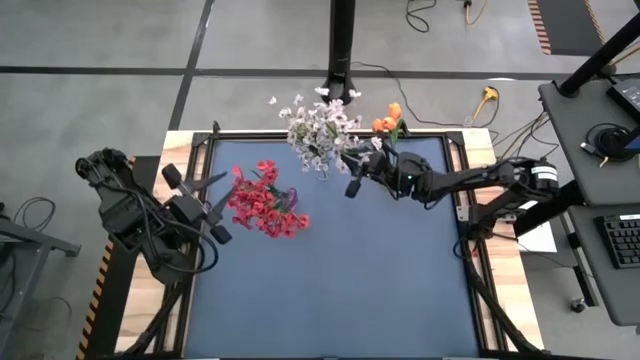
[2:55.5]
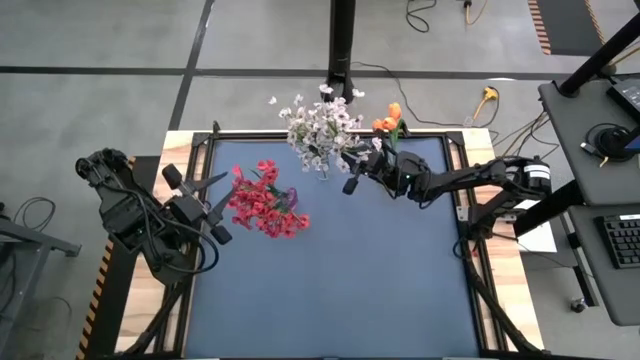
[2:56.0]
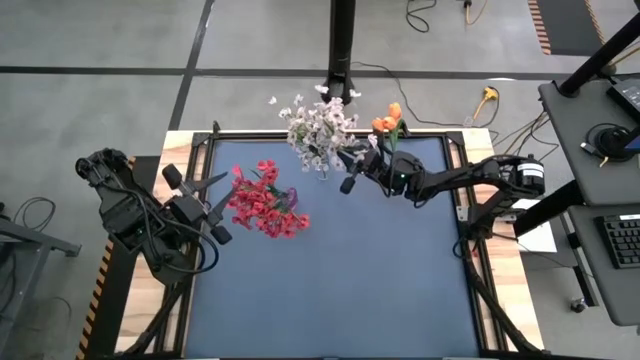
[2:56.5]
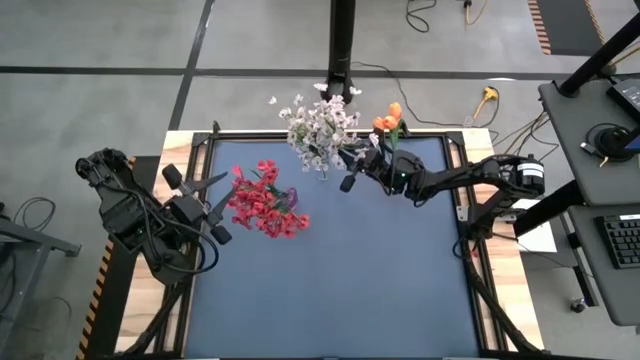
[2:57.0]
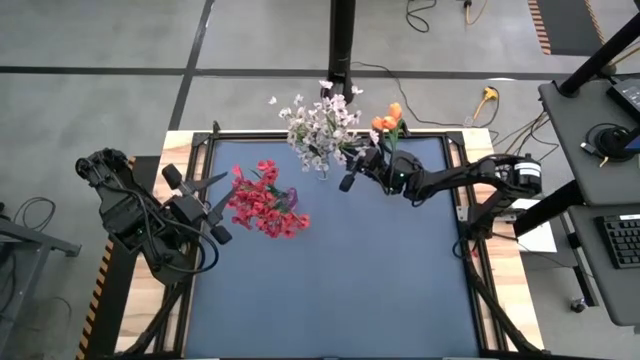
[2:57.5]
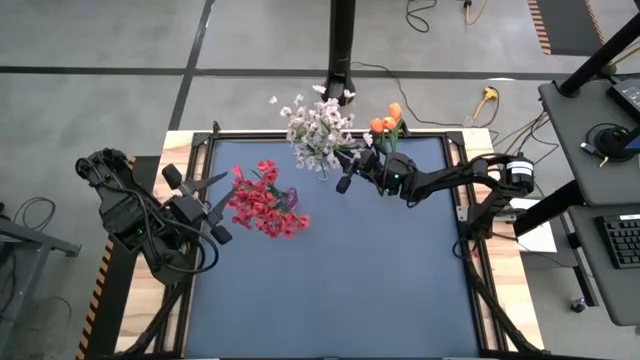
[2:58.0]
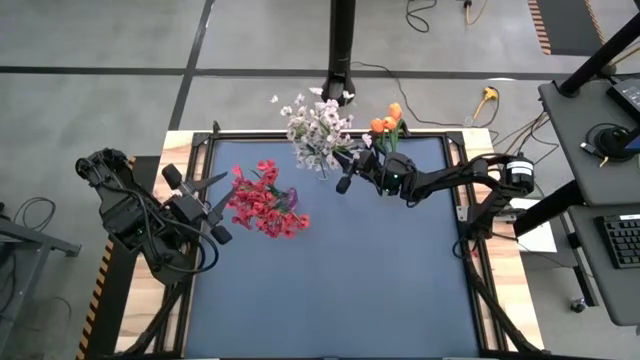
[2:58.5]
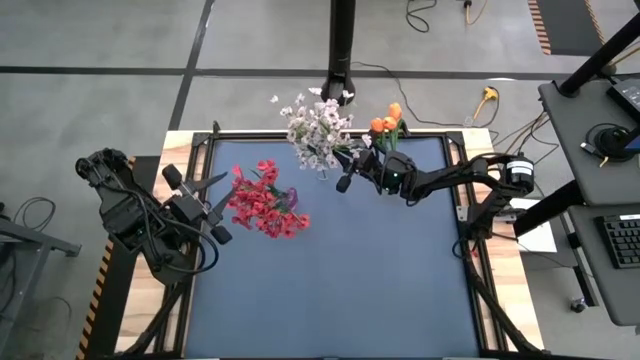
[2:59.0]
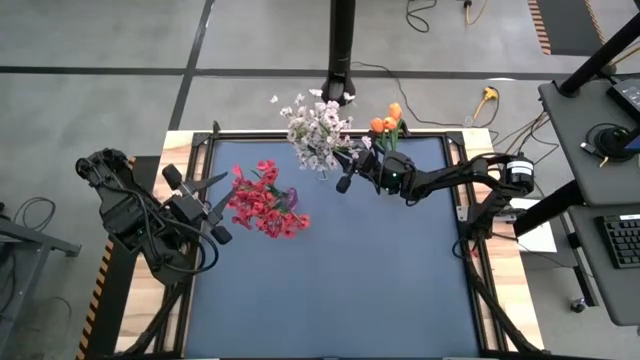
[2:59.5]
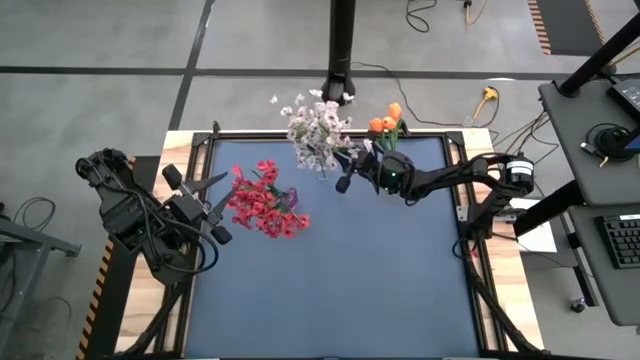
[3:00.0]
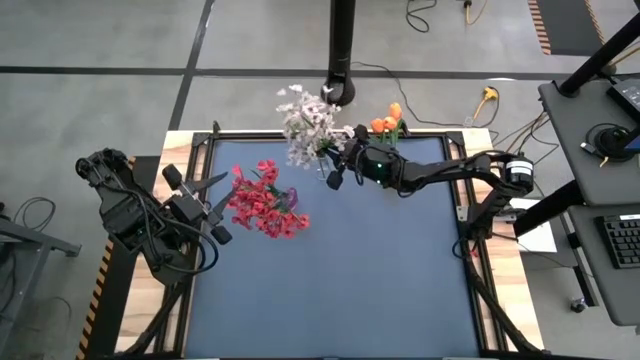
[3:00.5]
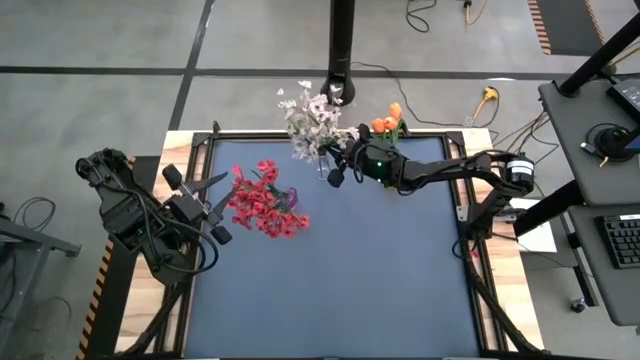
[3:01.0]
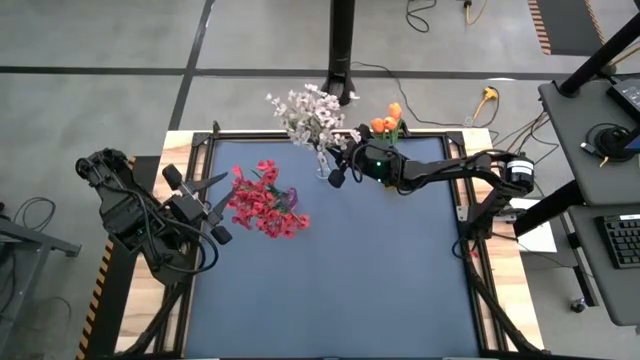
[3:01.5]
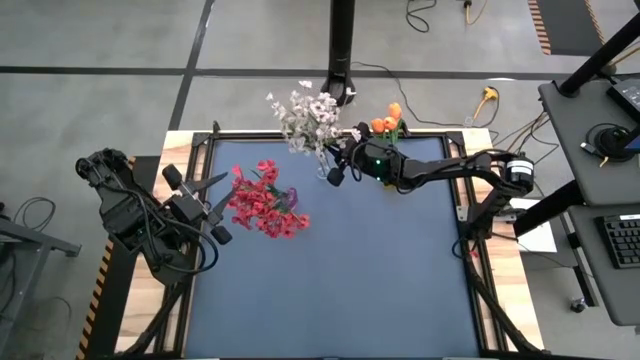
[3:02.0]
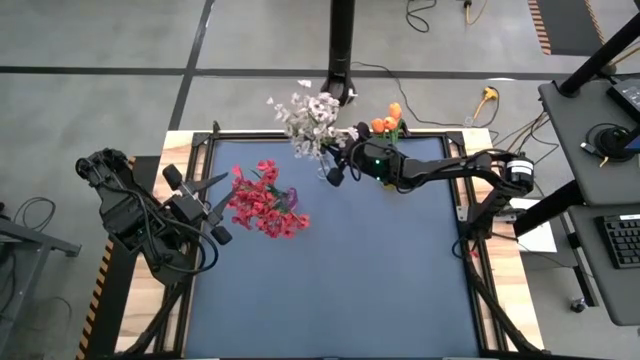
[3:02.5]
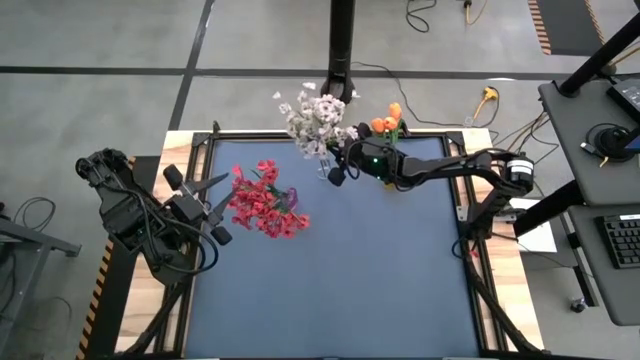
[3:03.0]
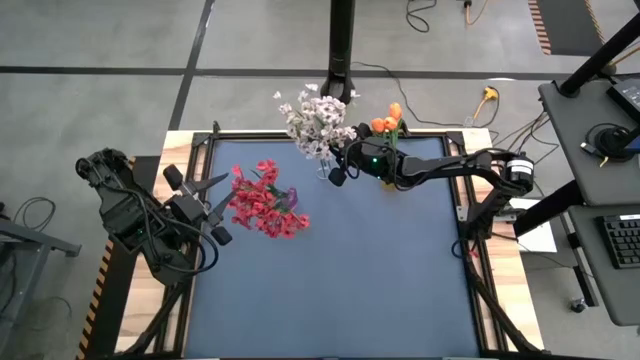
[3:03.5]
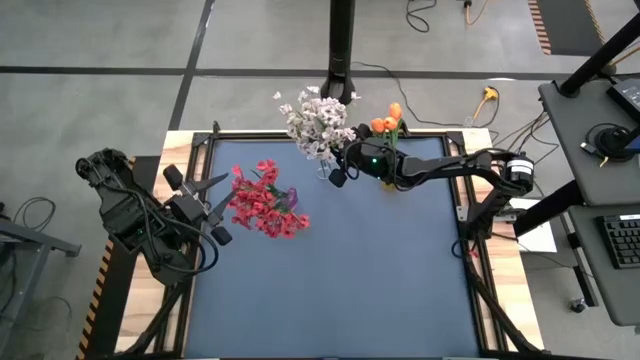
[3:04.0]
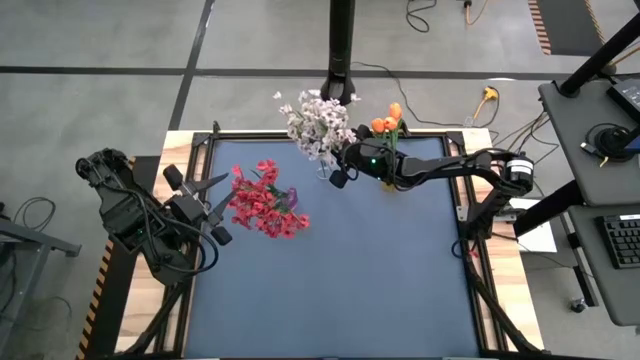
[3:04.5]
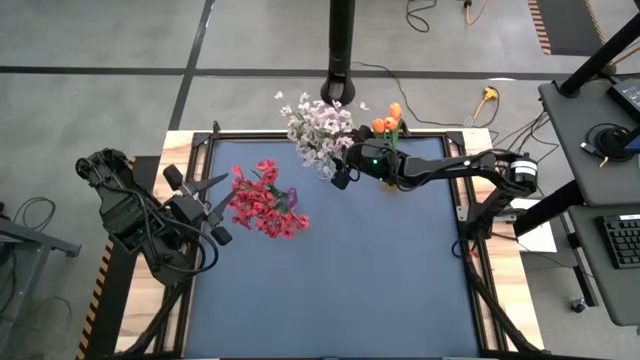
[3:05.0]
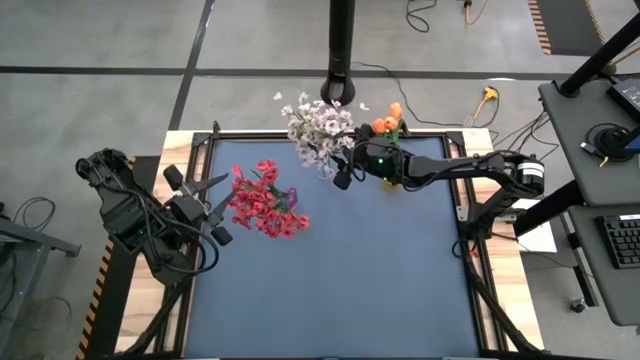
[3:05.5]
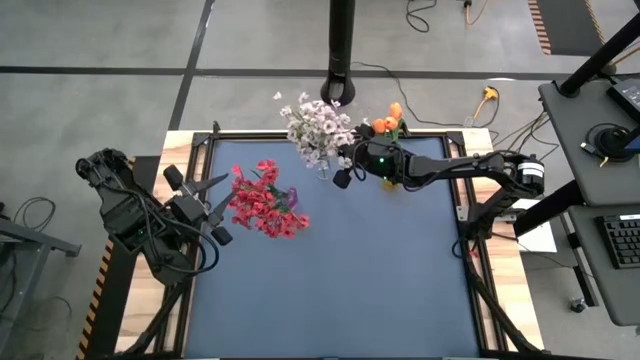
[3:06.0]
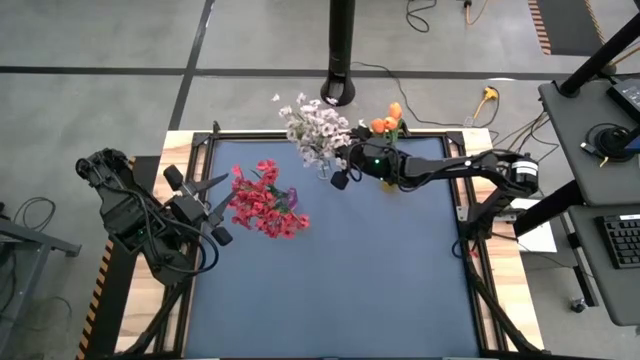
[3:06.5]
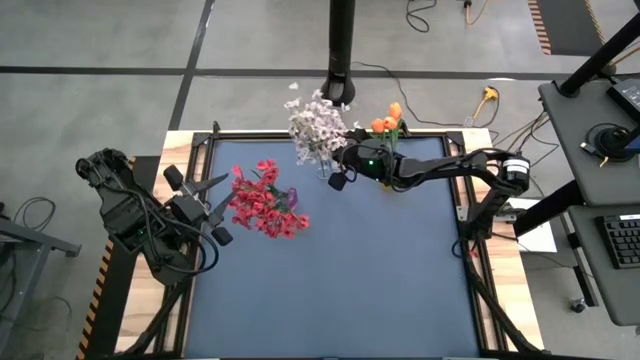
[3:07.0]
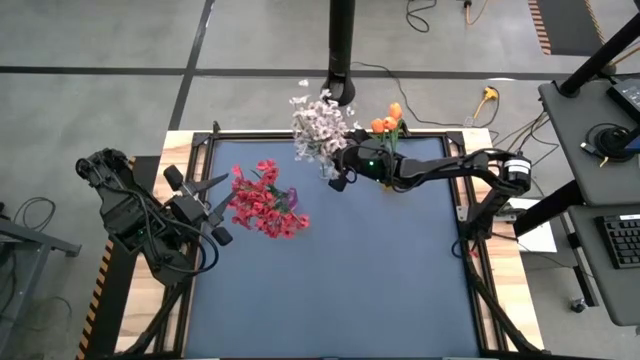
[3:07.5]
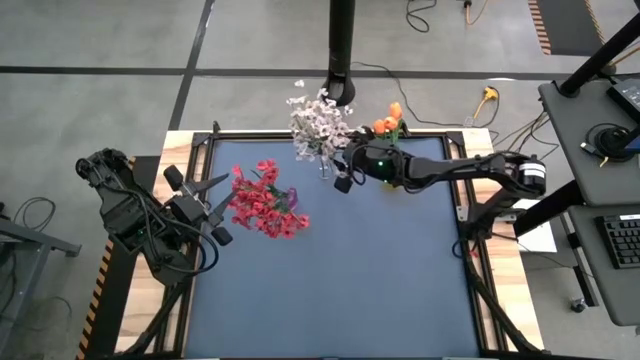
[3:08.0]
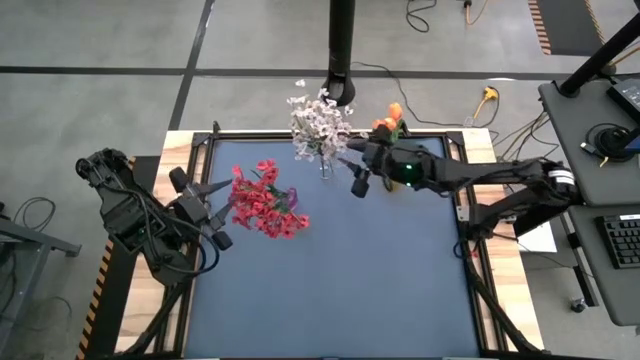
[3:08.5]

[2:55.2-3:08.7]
Task: Sort flowers into vase by color
Put the white flower into the transparent vase

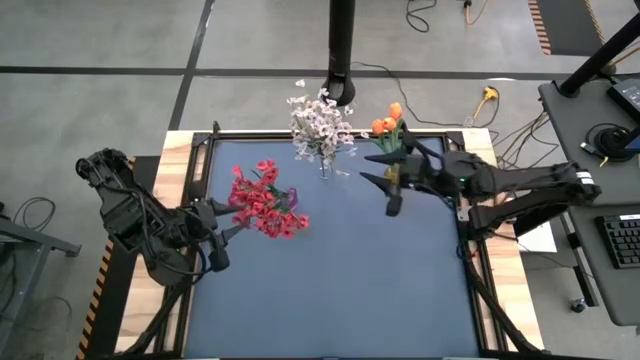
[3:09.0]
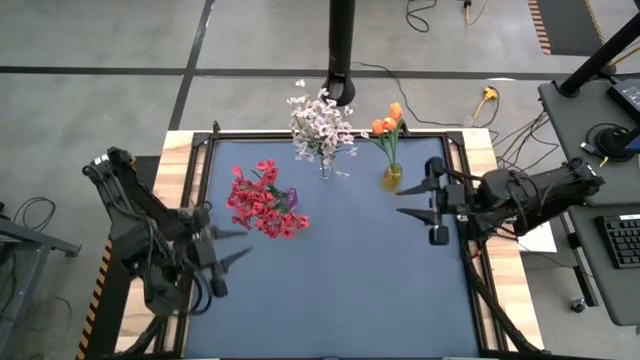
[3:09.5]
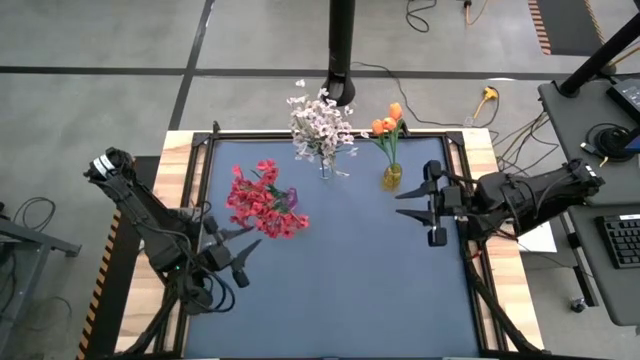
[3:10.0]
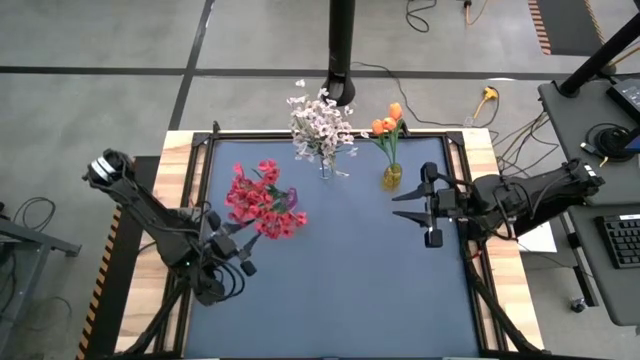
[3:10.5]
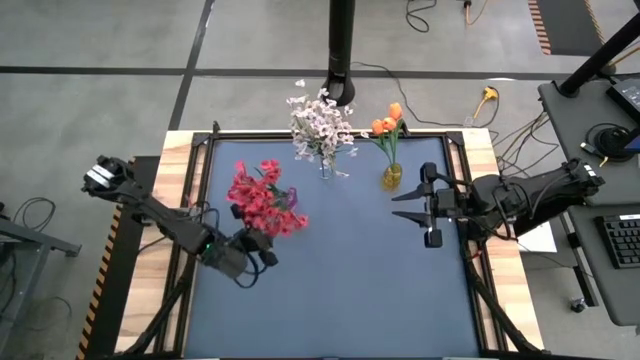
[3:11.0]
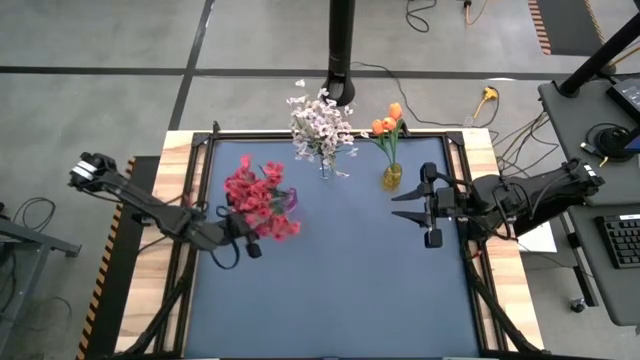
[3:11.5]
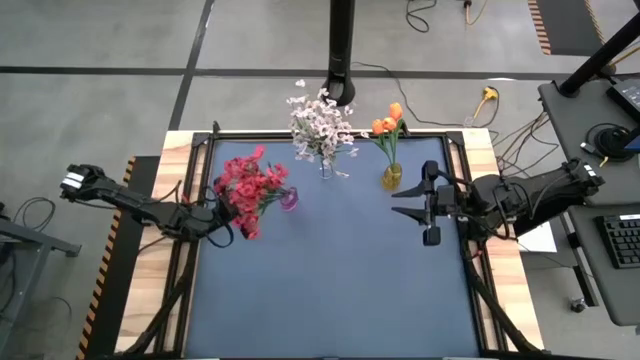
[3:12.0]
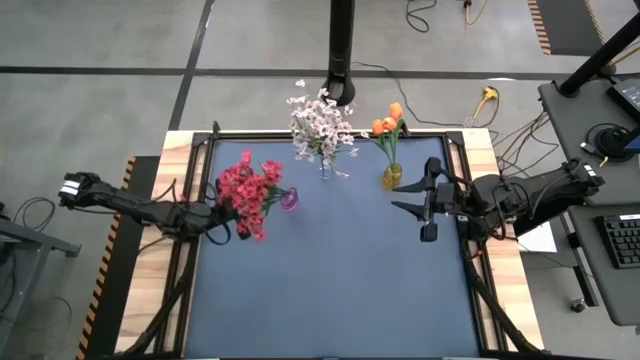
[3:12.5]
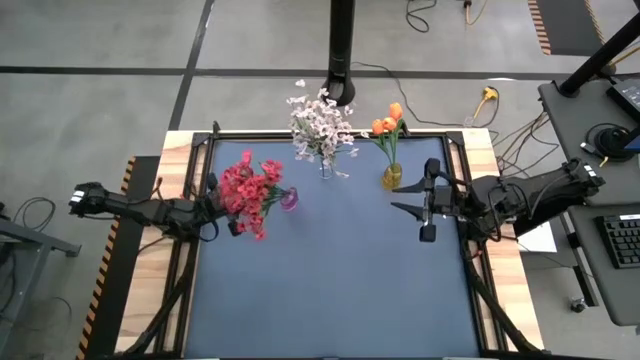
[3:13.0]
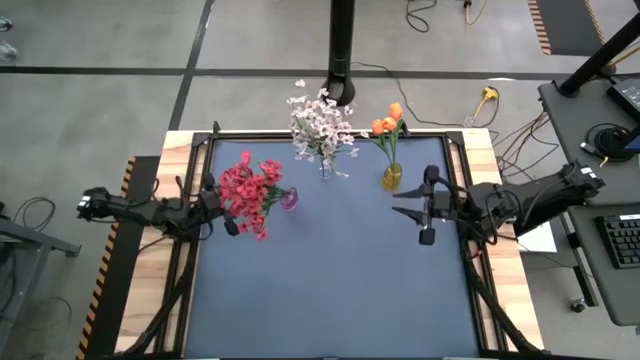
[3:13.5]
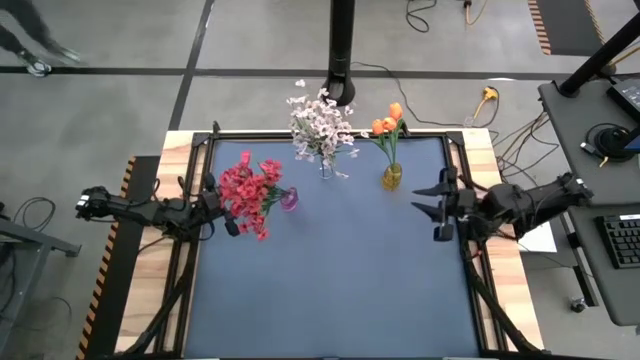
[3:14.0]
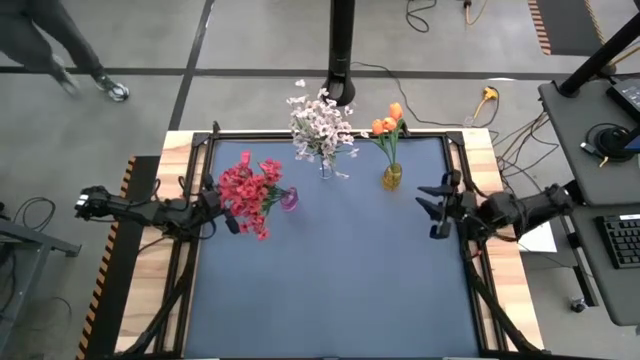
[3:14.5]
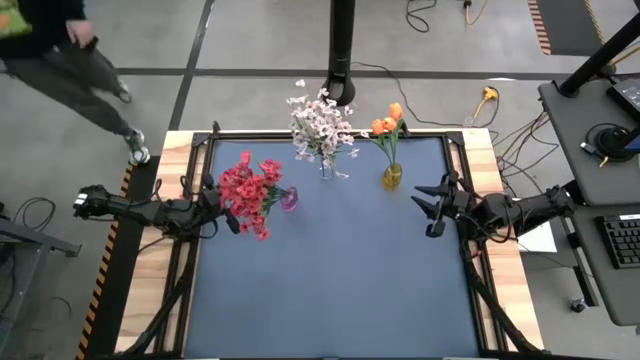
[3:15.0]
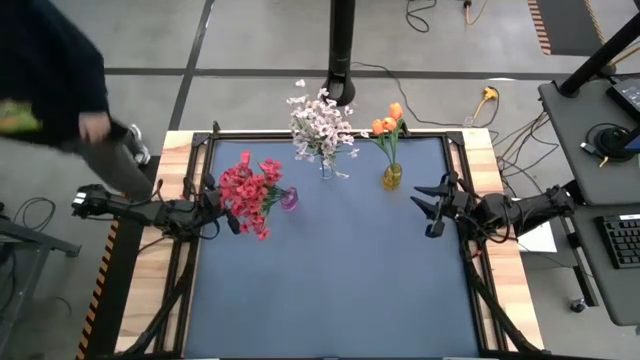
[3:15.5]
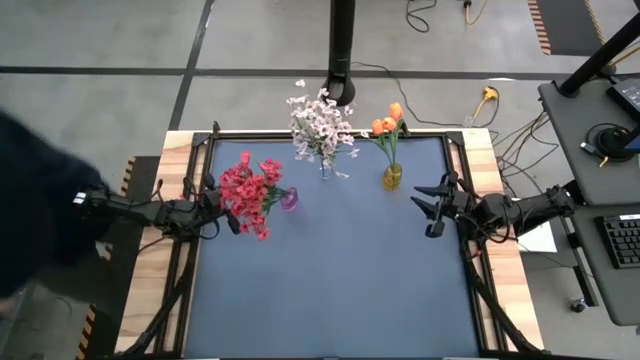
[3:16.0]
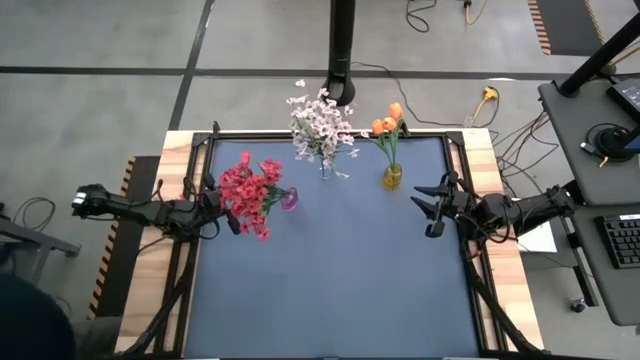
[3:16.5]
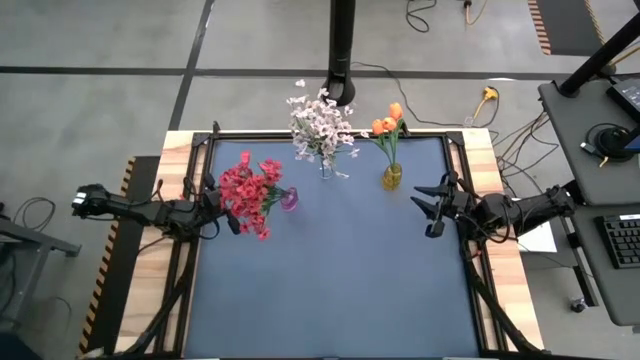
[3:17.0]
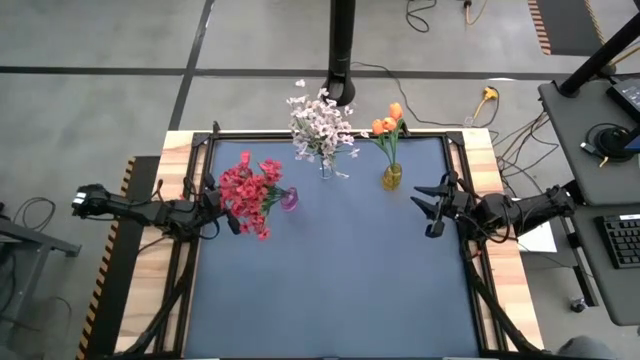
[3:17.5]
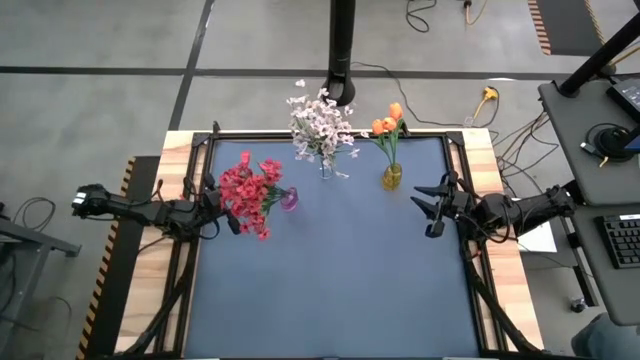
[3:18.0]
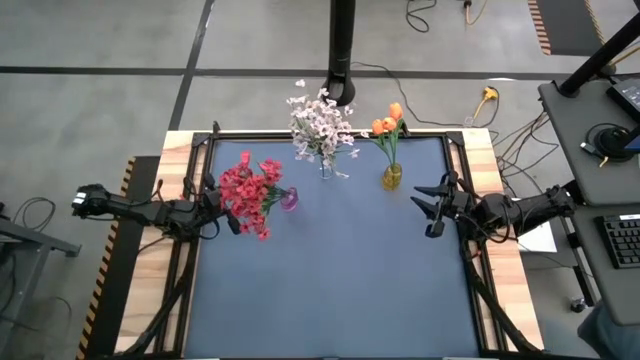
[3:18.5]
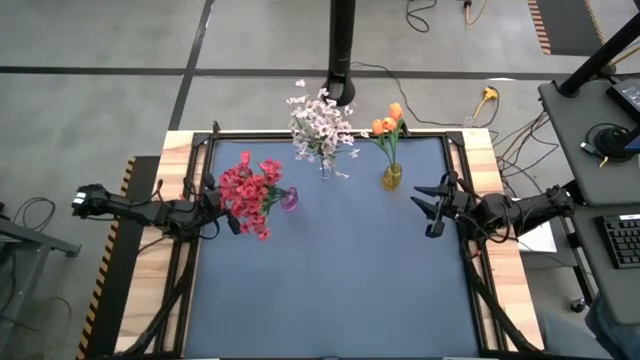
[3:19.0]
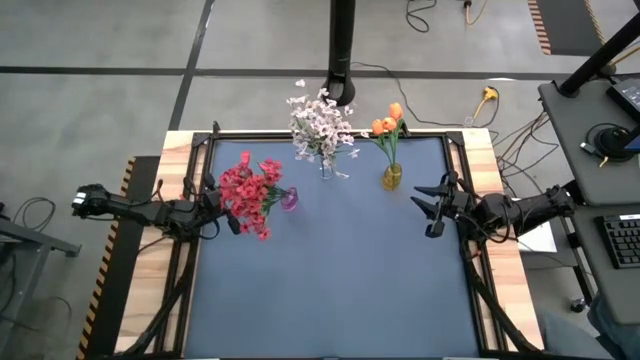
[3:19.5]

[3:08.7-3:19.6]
Return to Home Position
